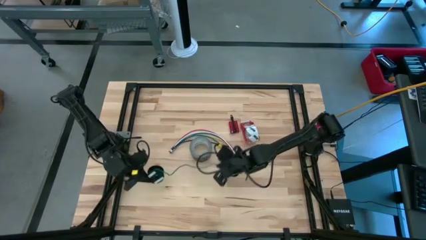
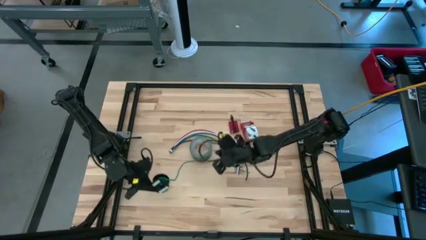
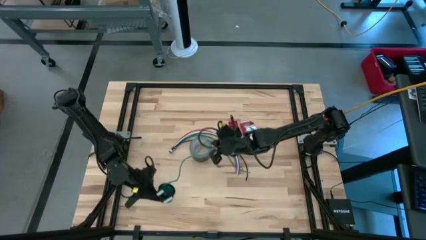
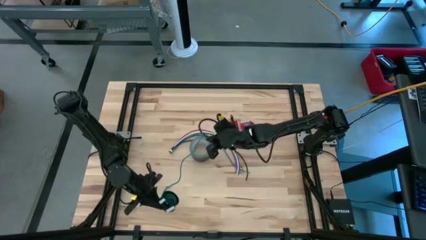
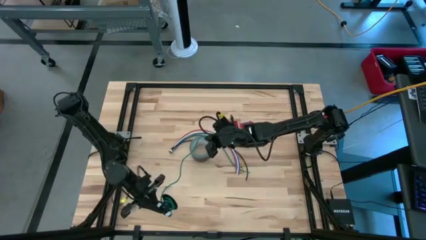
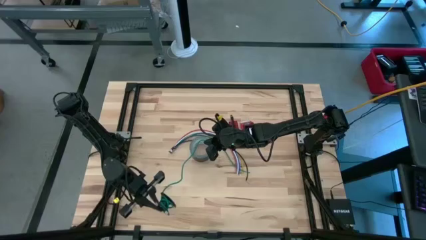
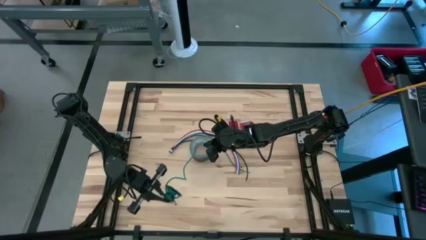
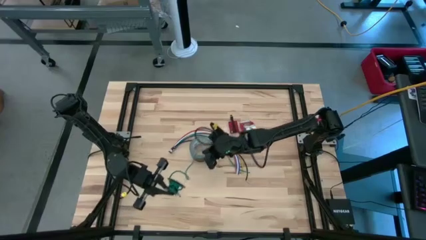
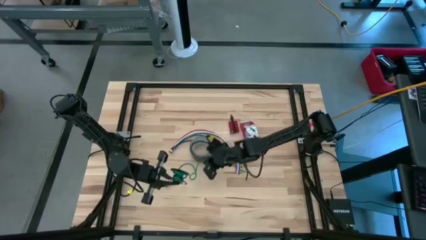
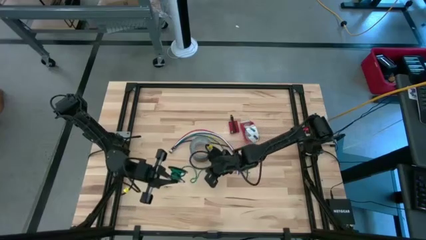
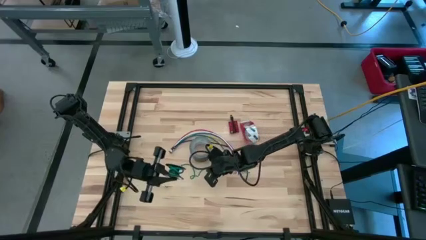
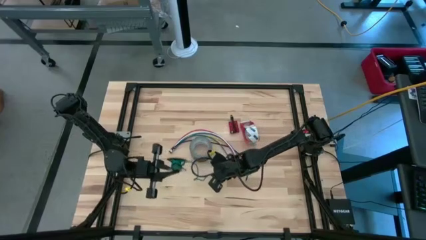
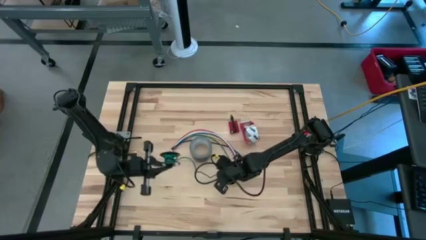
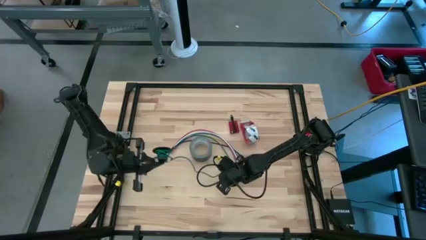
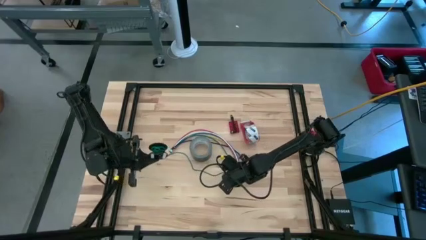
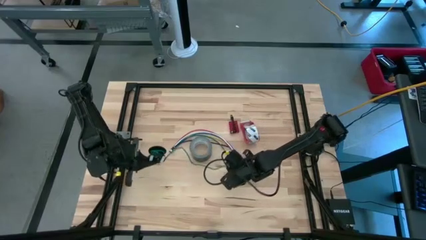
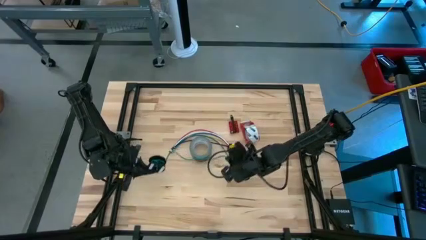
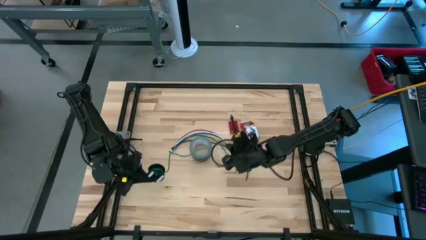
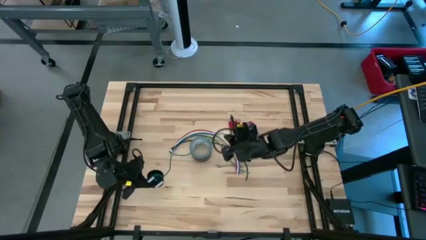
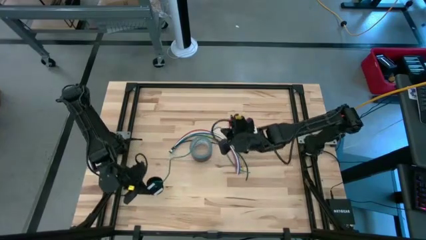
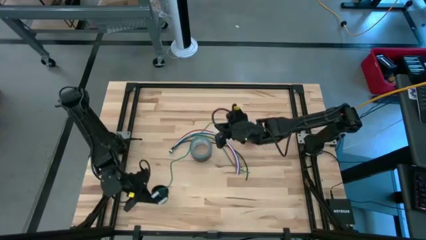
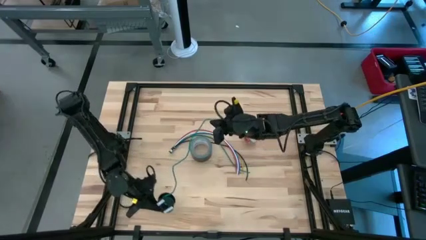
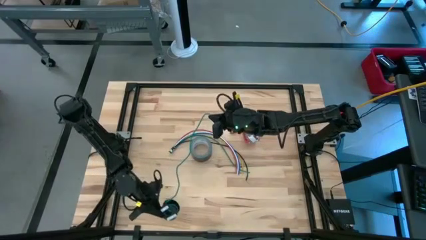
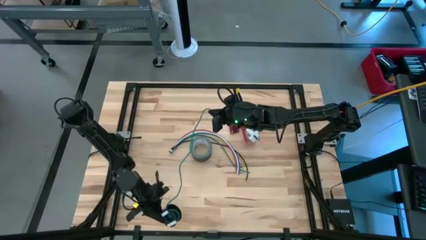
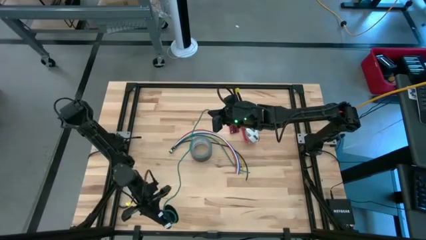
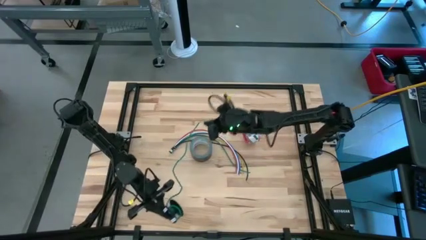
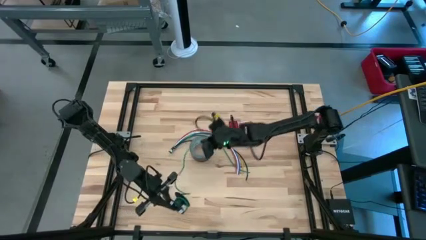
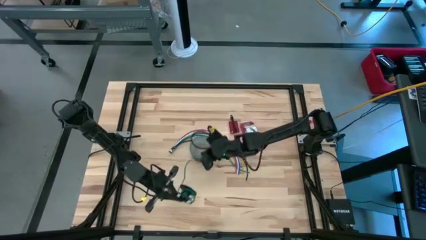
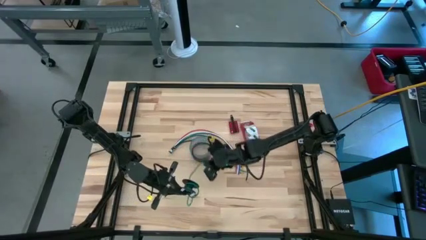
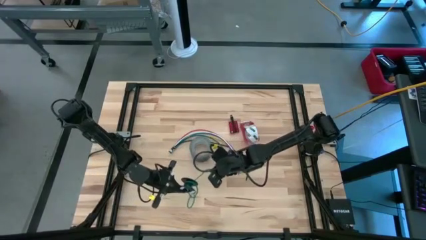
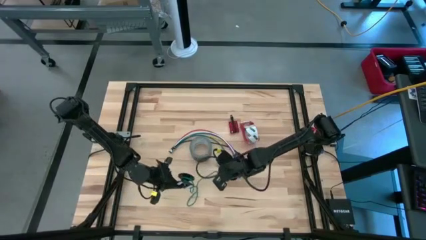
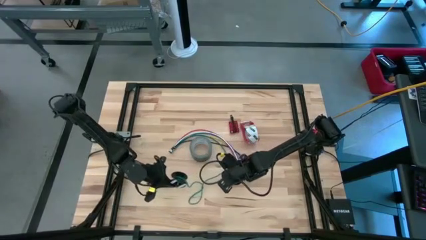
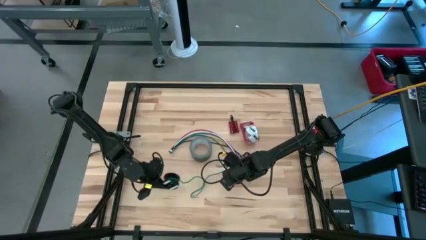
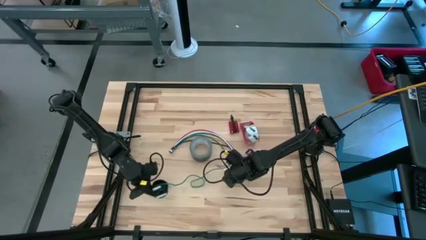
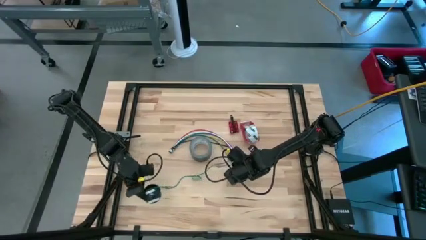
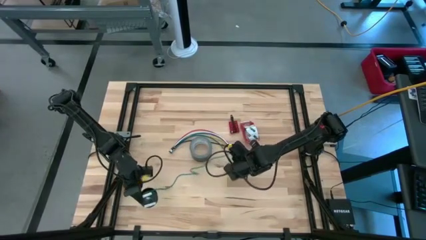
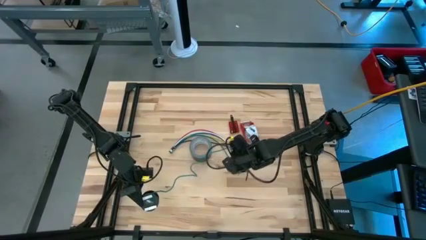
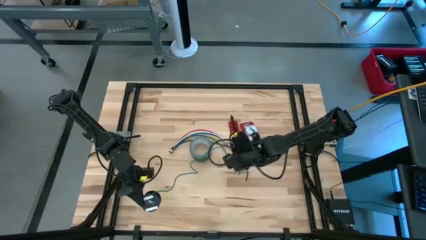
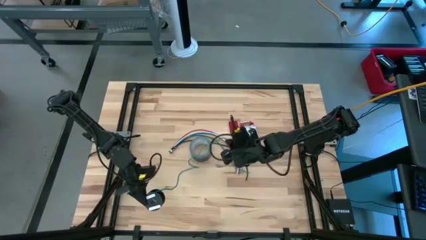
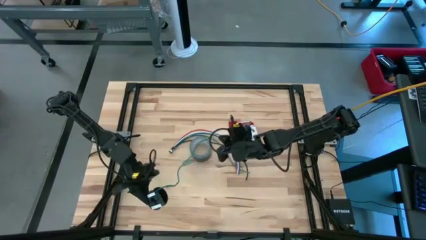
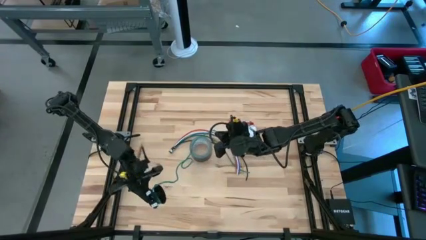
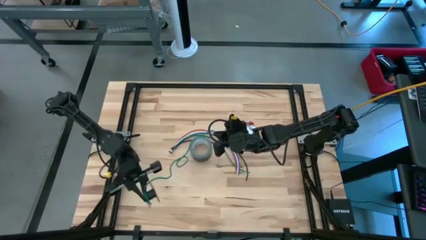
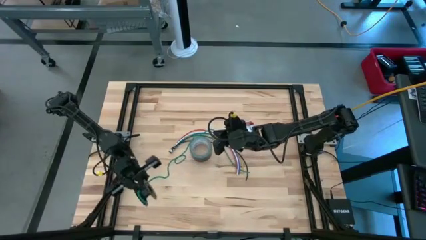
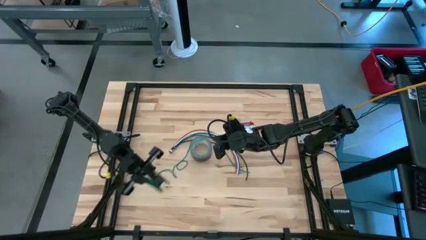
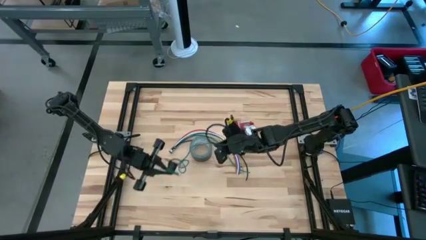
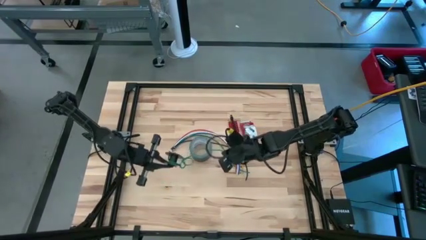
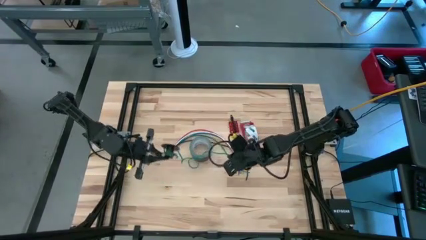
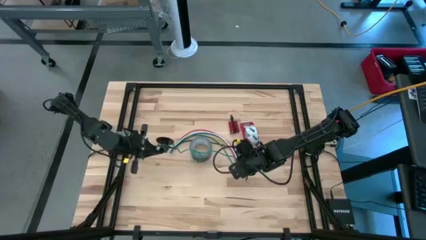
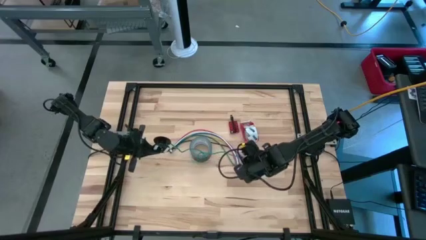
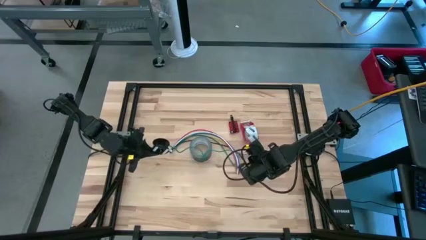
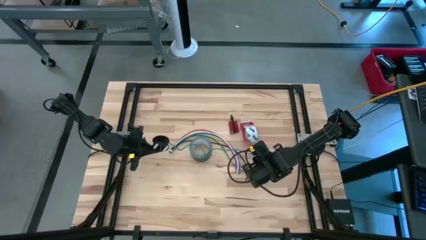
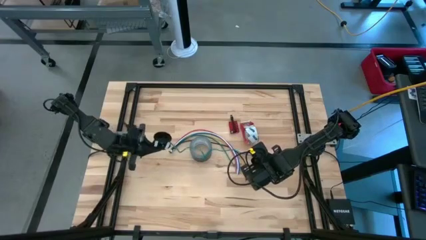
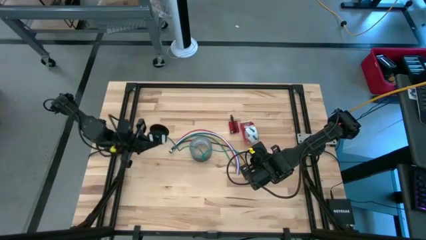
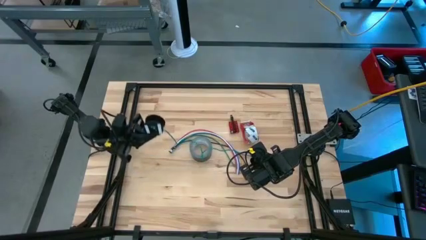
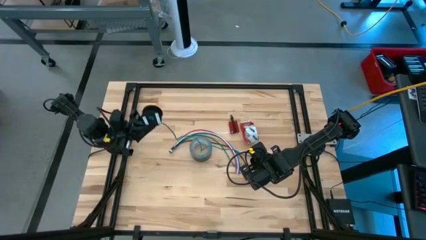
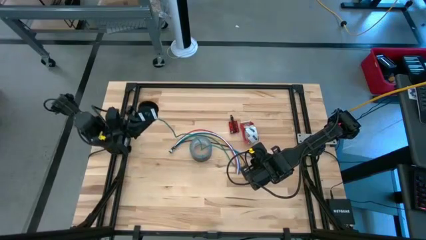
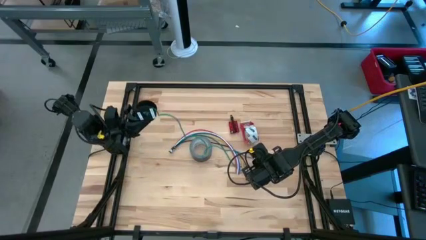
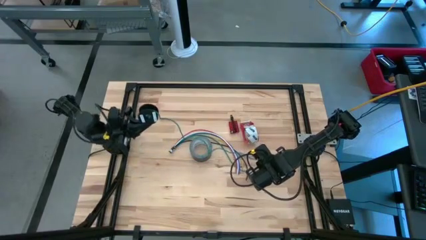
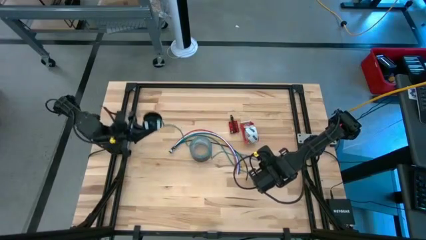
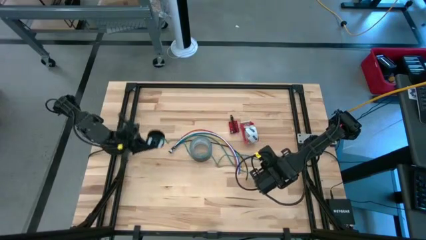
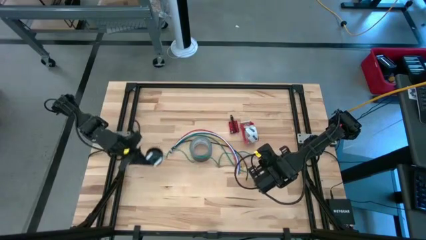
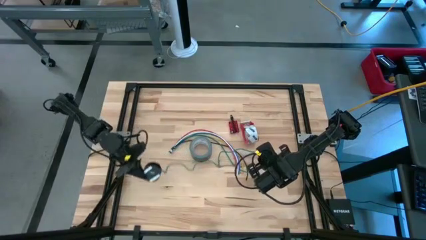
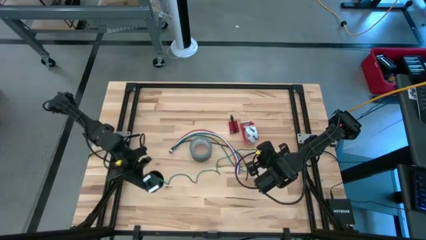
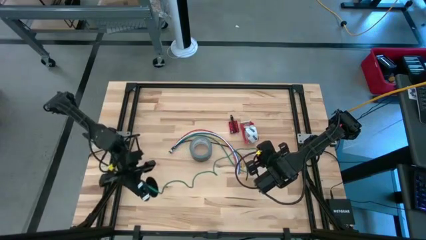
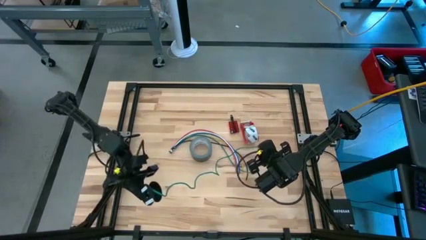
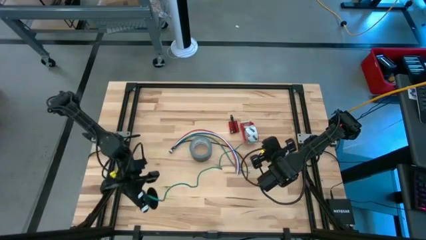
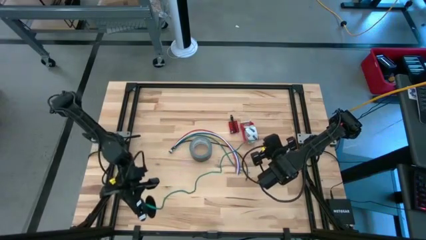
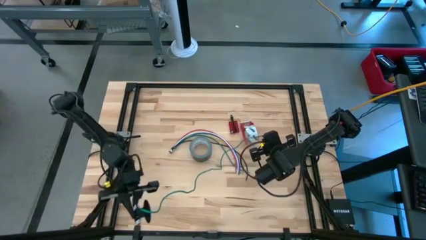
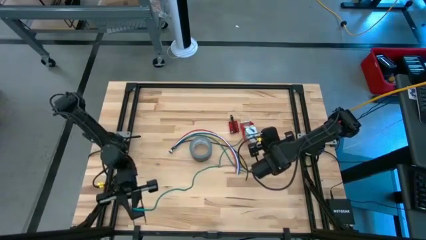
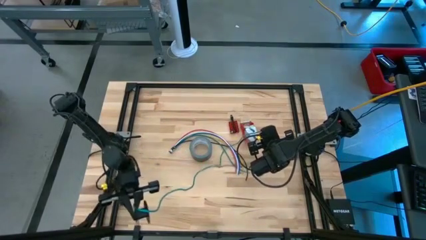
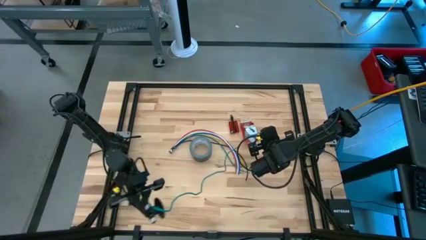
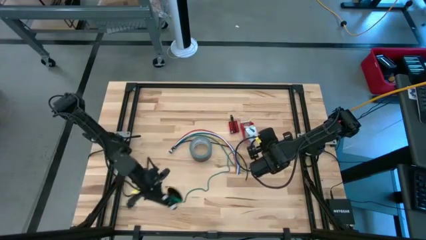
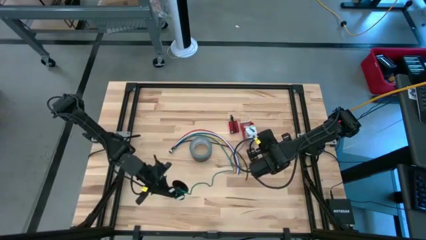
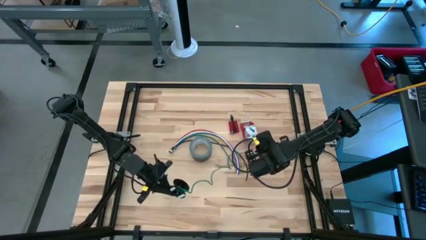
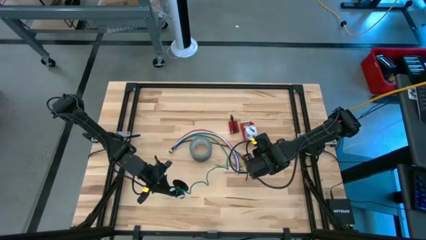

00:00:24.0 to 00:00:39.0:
Task: Coil cords
Uncoil the green wire from the spool

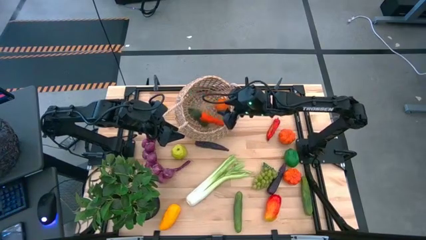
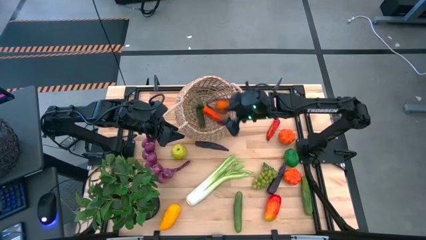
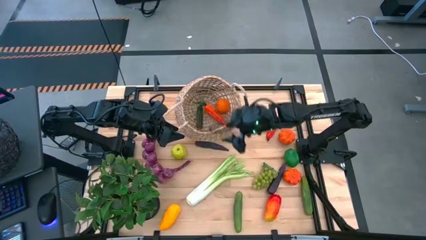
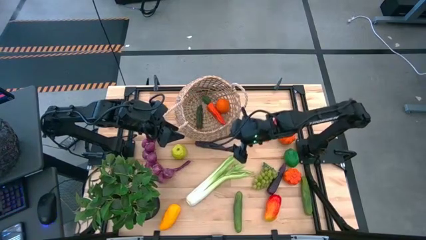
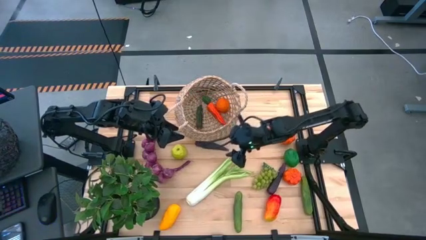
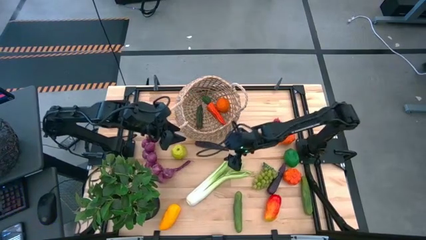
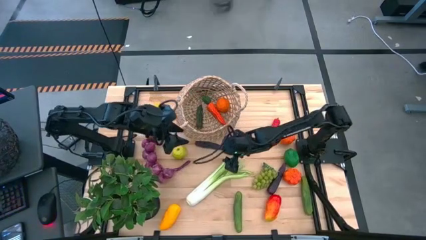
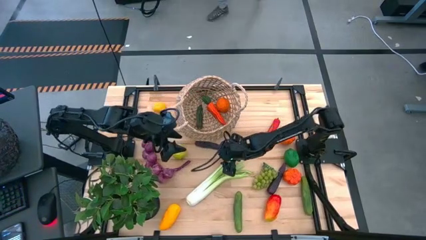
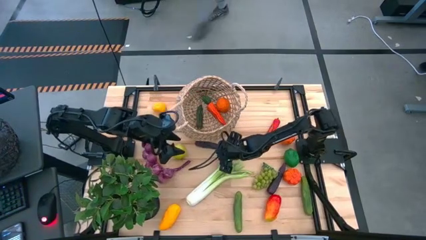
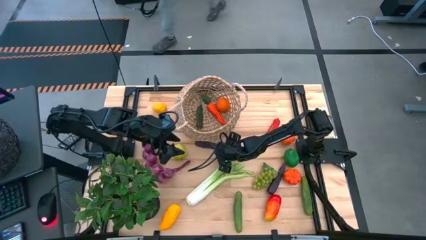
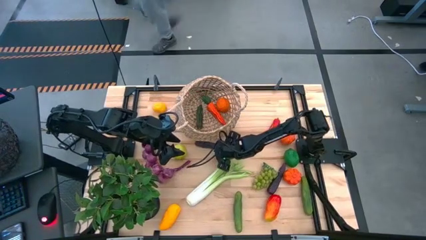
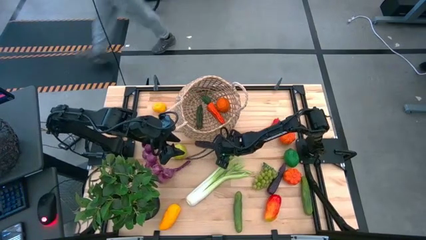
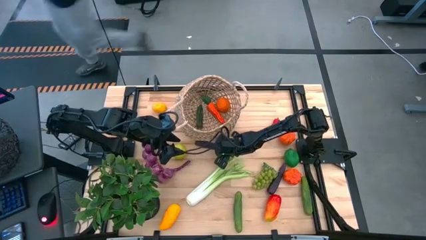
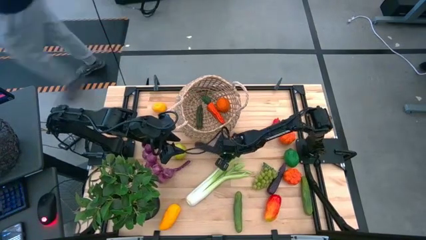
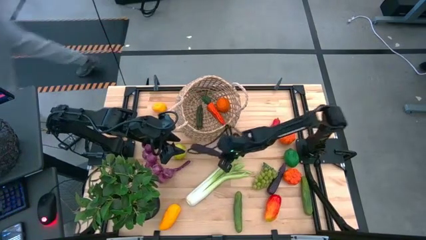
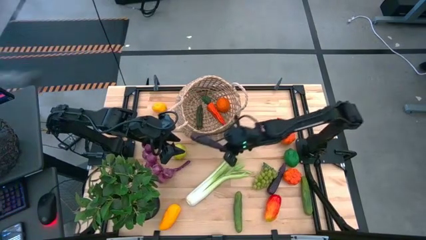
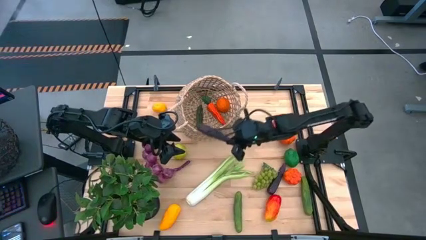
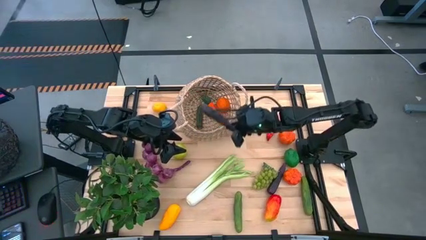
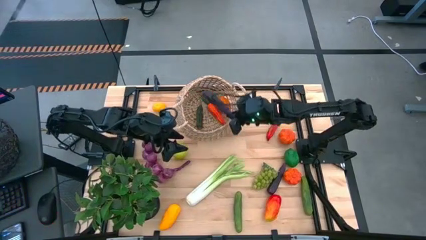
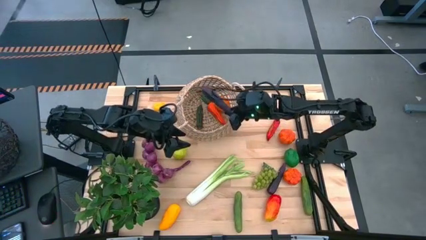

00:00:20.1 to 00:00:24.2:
Task: Build produce basket
Put the top eggplant into the brown basket
